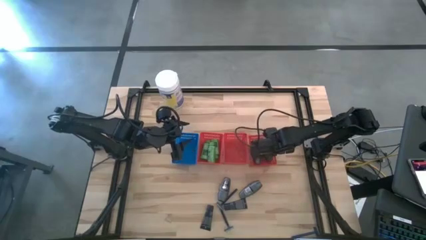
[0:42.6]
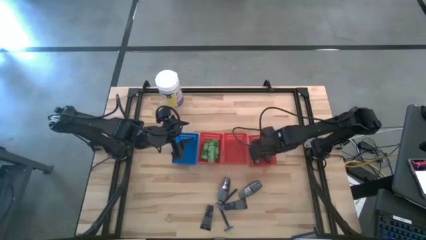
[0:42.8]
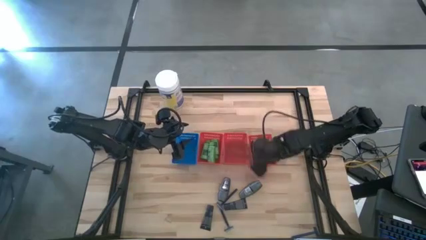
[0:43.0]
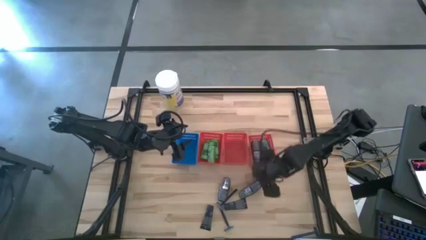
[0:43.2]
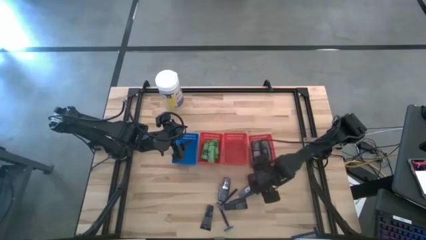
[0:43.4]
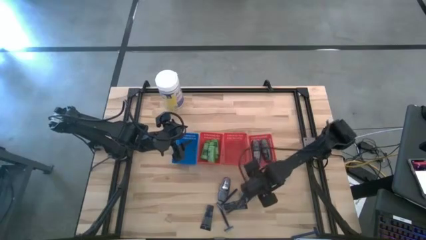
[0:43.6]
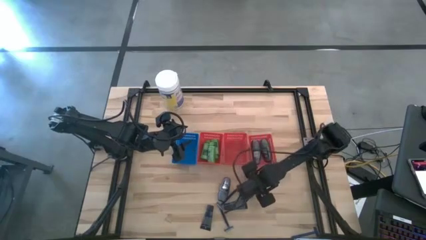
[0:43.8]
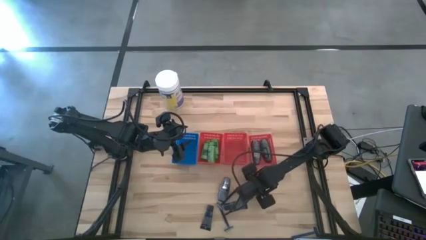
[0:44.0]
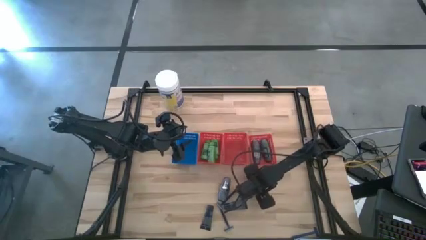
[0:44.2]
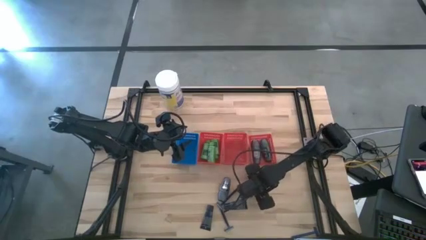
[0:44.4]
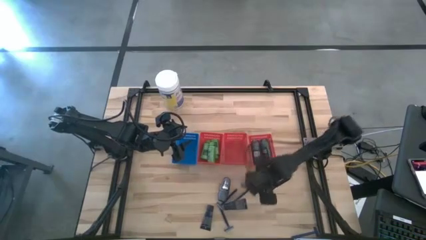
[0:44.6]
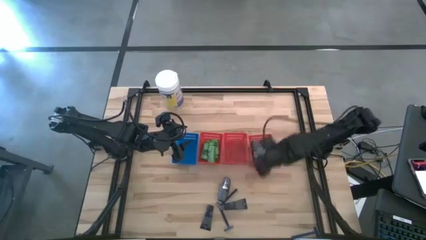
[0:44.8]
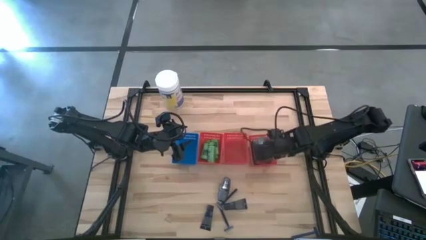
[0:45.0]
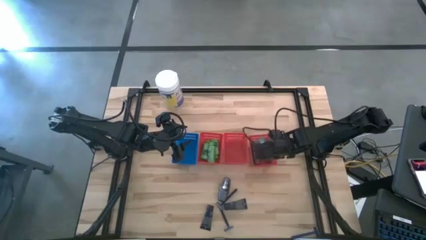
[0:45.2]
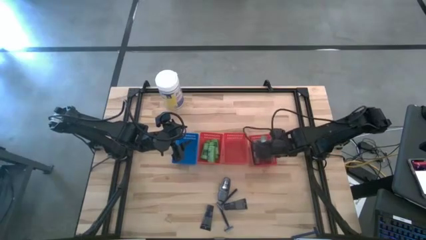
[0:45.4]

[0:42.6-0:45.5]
Task: Pick & Place Travel size toiletries
Put the gray deodorant into the right red basket

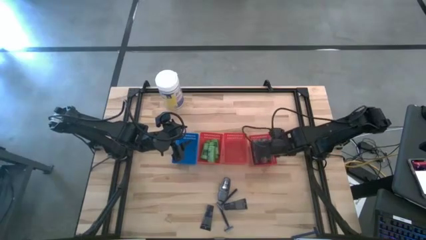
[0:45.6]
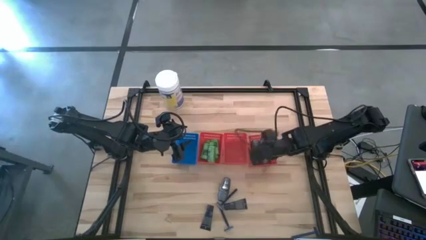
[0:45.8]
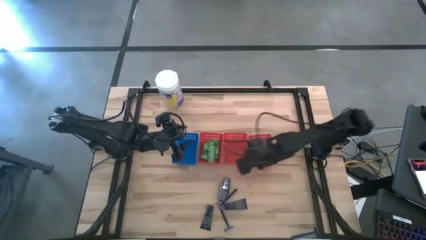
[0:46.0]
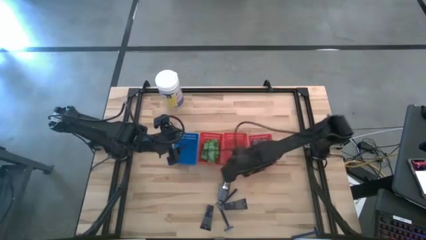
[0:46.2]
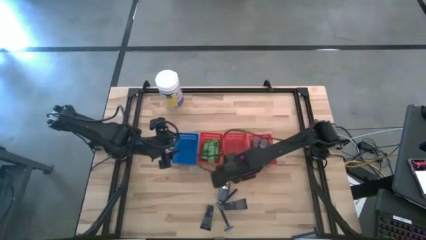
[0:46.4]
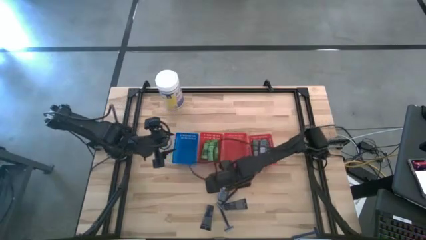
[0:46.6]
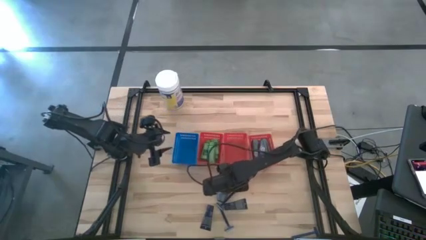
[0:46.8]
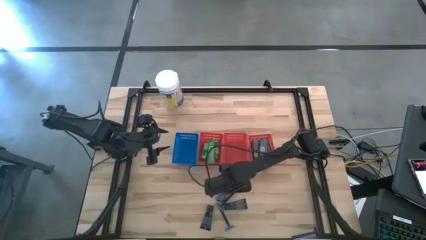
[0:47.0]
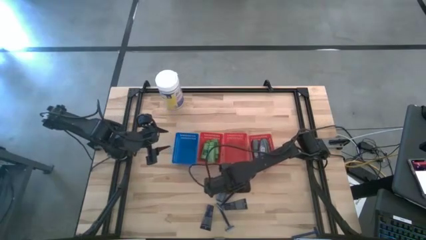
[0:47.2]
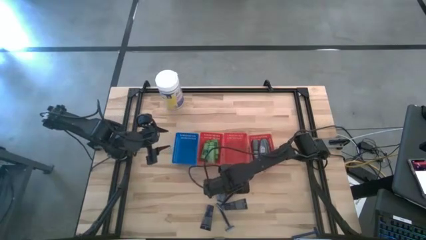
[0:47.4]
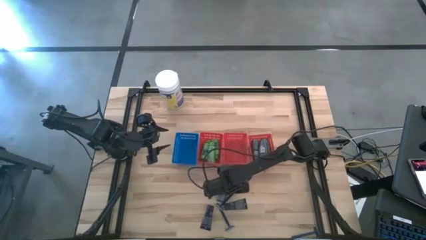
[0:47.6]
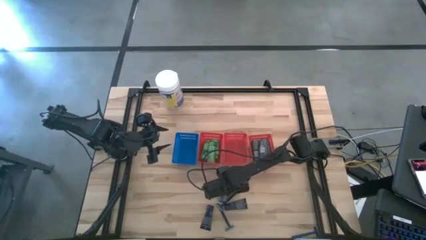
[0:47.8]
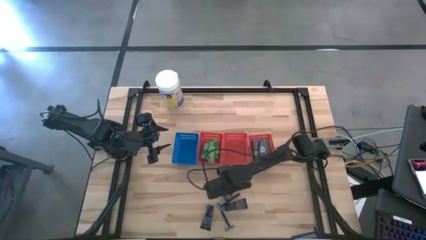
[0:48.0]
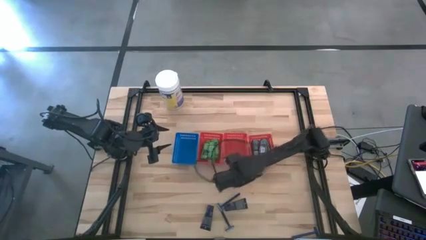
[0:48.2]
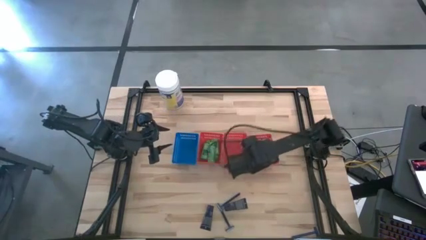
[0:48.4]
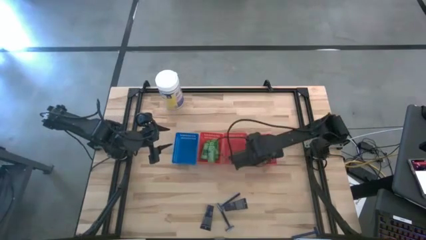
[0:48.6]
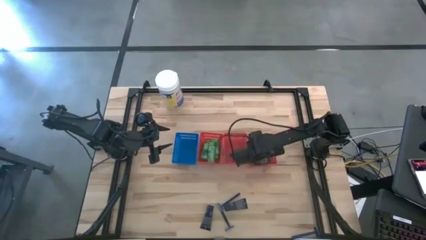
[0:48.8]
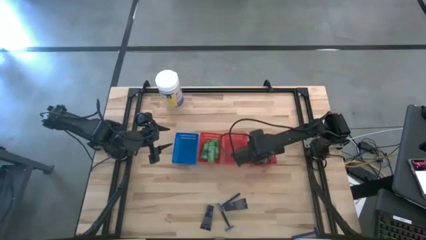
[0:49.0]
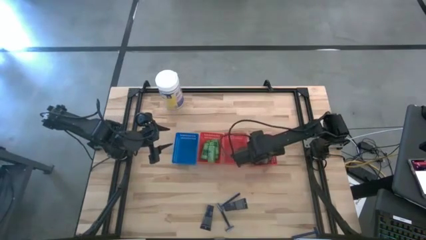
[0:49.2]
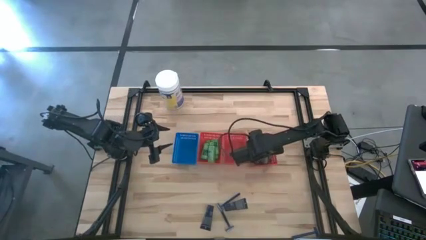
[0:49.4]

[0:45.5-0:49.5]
Put the gray deodorant into the right red basket

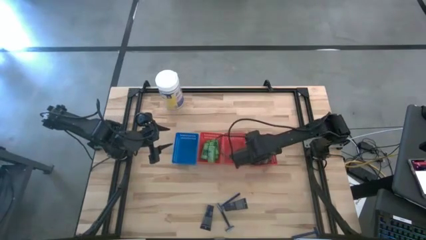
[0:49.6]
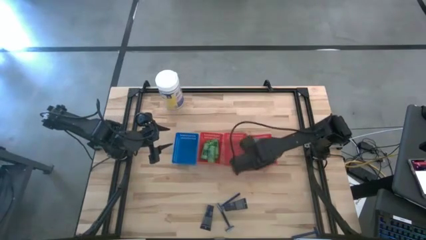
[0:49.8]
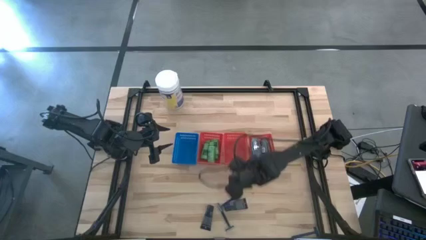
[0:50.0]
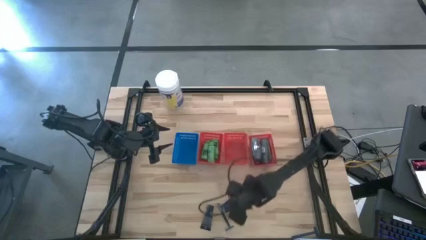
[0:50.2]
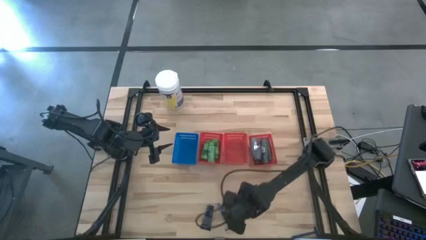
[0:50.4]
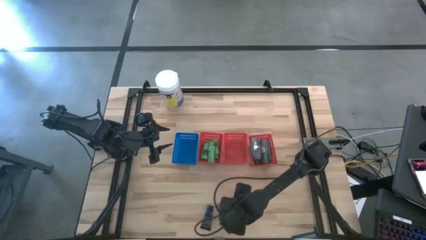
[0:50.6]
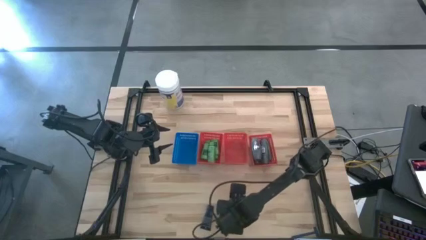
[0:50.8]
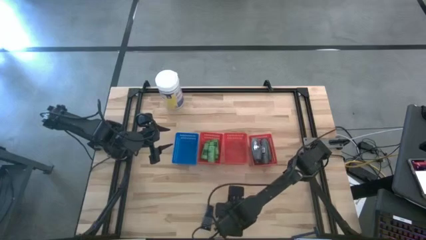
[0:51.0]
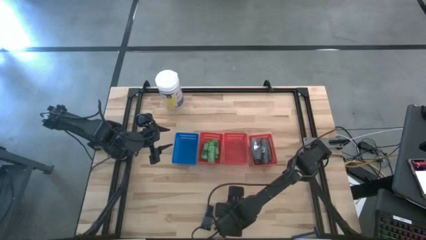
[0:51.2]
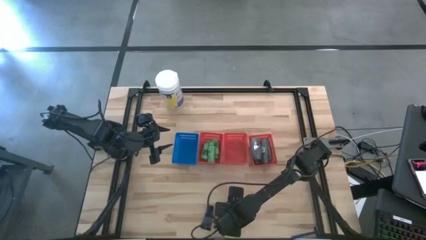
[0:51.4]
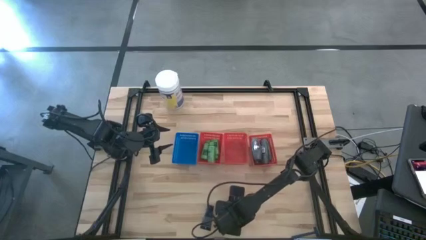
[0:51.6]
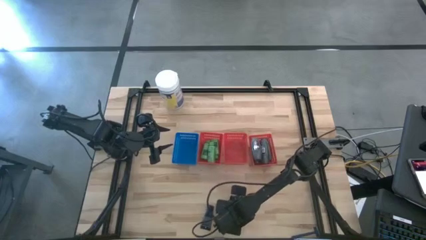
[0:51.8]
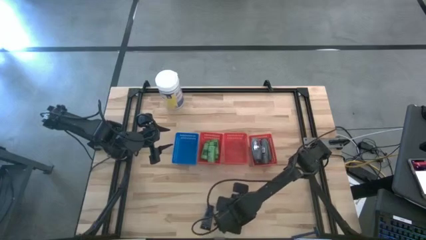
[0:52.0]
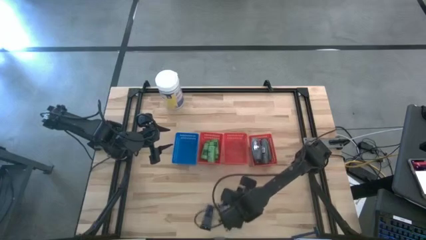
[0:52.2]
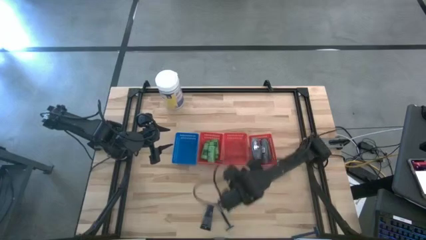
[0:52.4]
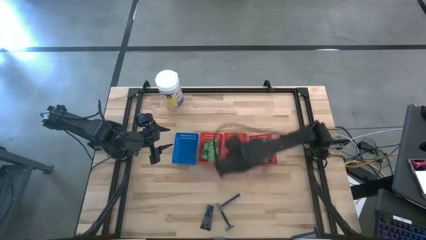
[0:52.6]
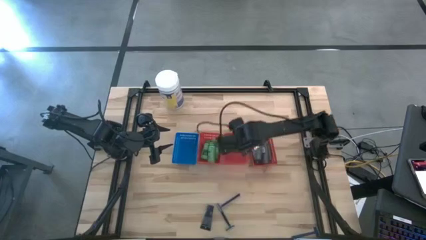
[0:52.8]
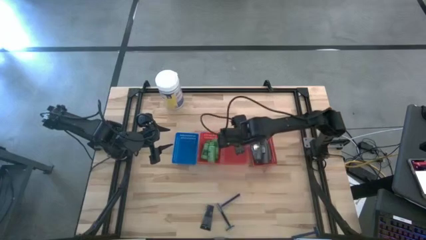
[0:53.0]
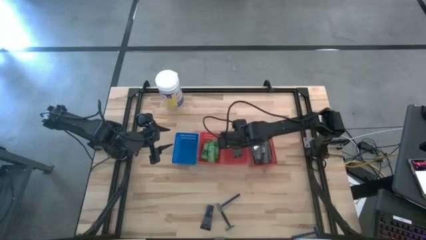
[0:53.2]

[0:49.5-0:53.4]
Put the right blue shave cream into the middle red basket

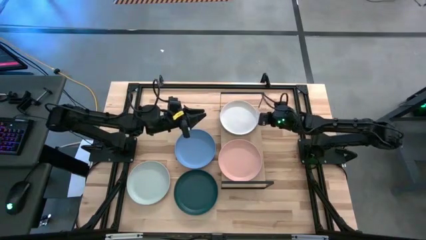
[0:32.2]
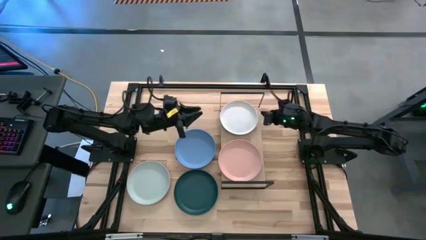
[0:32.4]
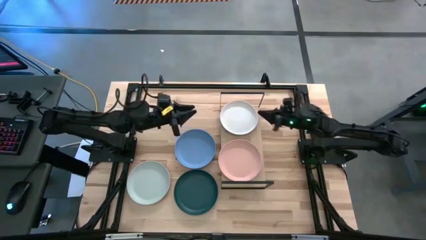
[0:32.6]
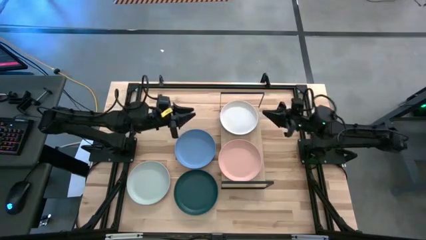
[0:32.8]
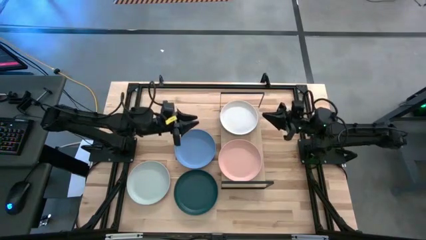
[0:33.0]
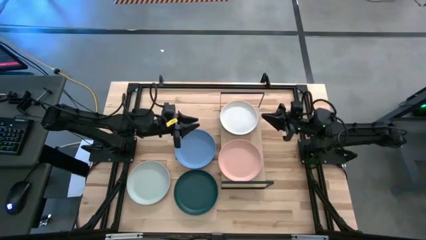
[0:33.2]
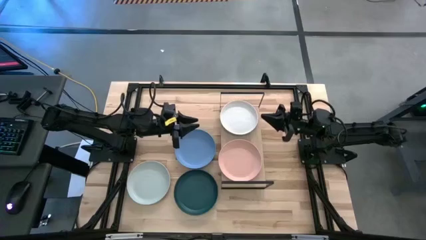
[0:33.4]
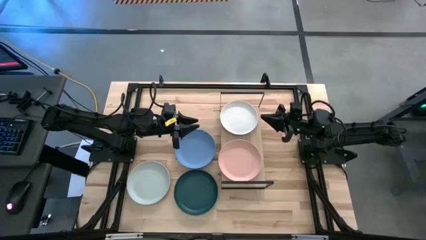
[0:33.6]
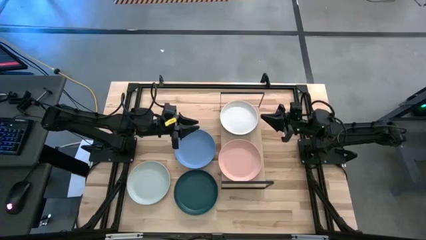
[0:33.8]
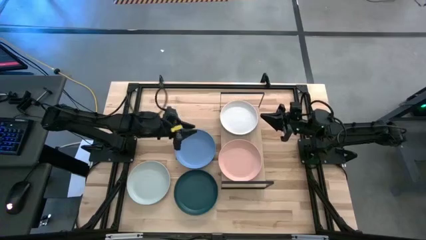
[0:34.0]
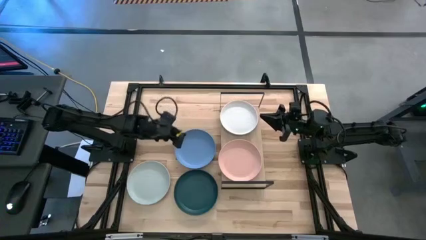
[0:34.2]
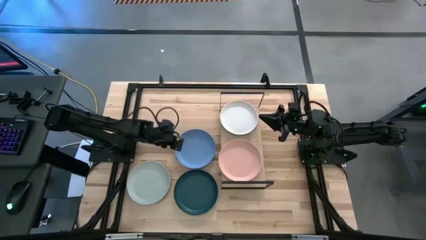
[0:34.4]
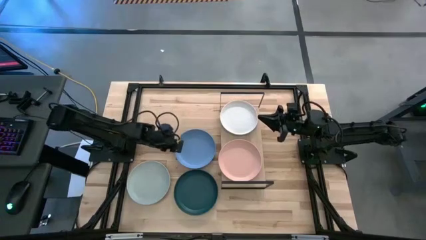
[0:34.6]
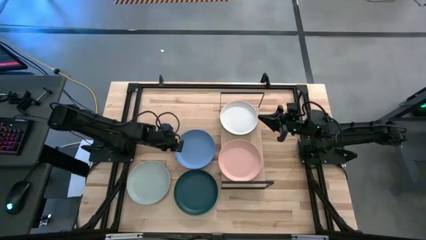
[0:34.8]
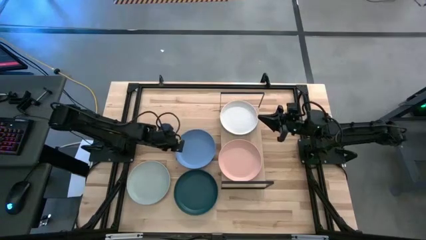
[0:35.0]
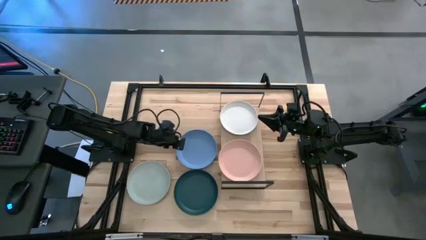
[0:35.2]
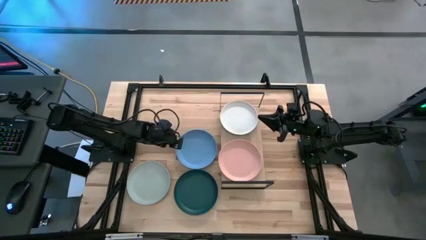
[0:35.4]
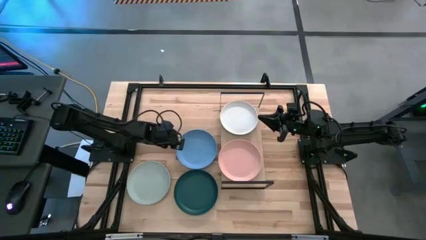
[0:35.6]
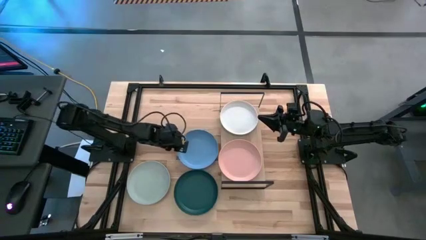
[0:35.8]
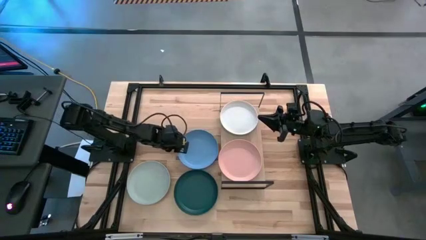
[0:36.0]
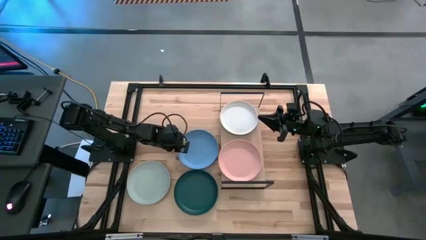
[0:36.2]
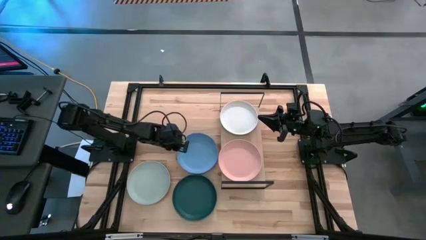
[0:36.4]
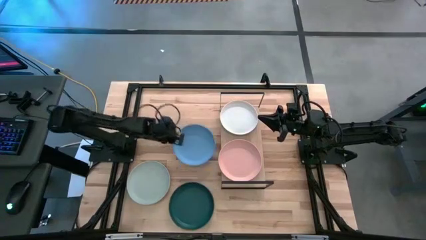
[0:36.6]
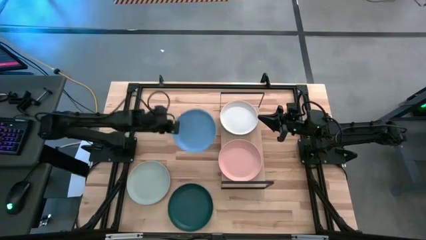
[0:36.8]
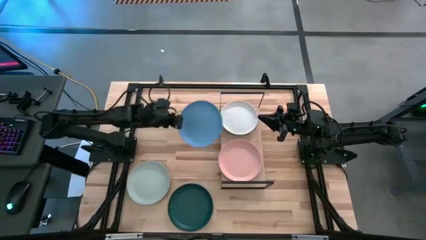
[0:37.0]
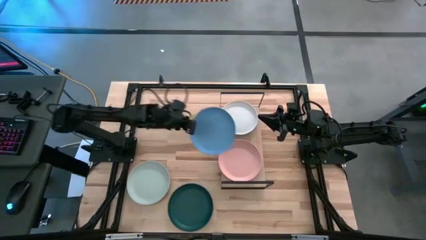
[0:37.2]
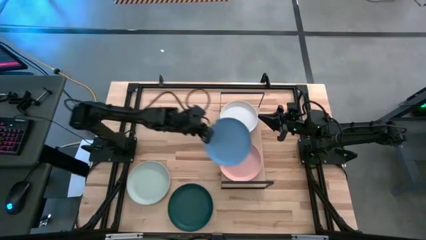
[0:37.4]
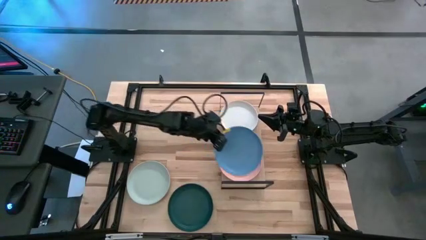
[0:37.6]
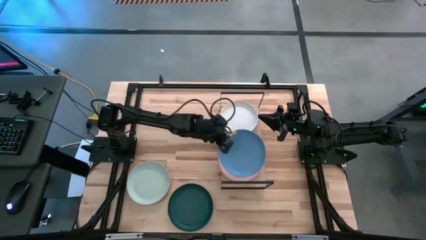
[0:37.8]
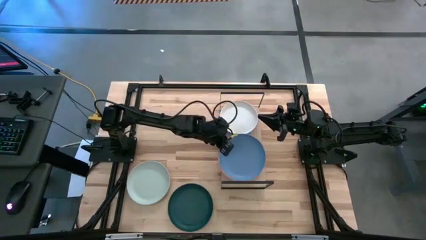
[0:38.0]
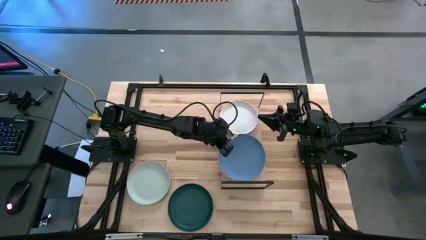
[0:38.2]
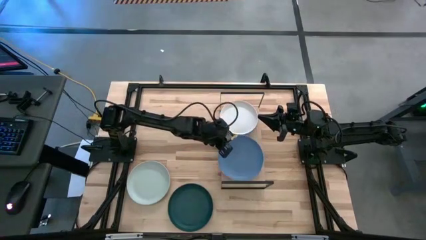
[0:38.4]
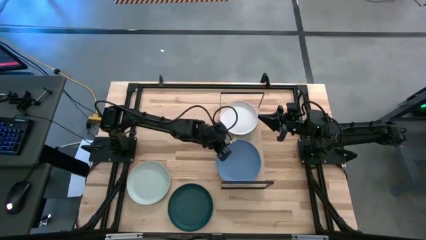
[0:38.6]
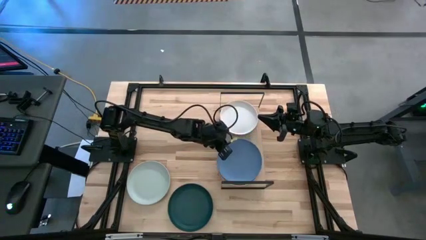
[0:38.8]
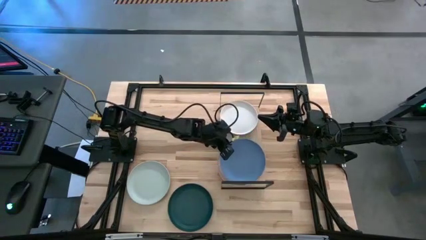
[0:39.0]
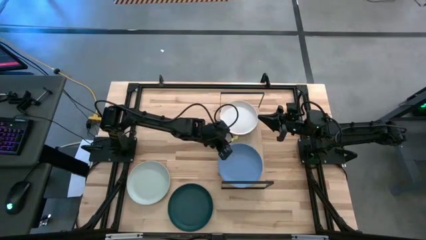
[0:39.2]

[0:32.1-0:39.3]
Task: Place and stack plates onto a shelf
Stack the blue plate on top of the pink plate on the shelf
